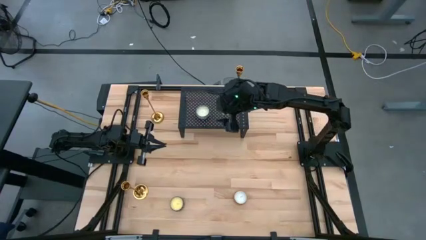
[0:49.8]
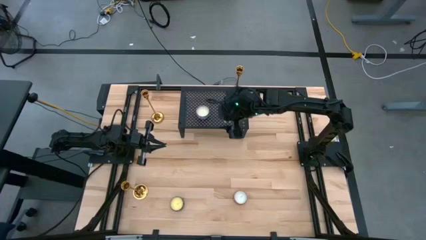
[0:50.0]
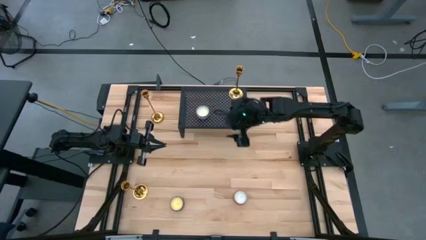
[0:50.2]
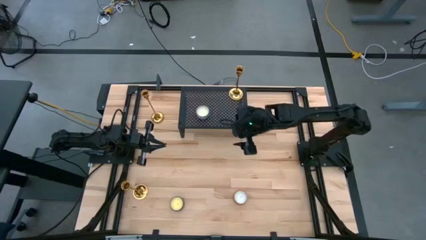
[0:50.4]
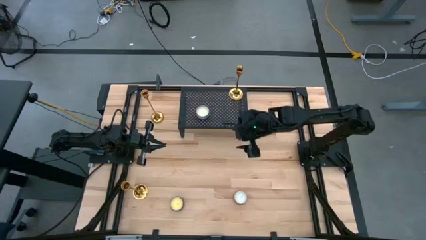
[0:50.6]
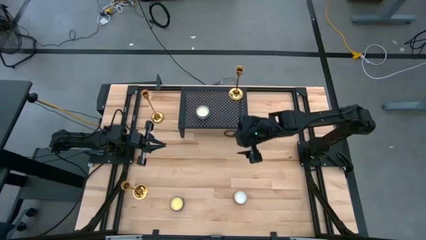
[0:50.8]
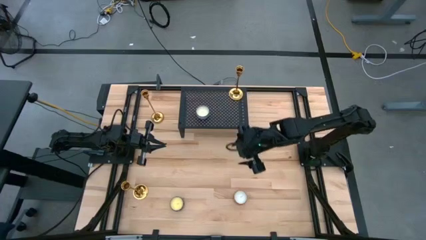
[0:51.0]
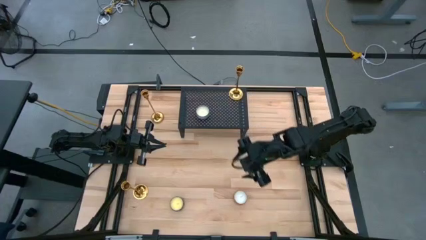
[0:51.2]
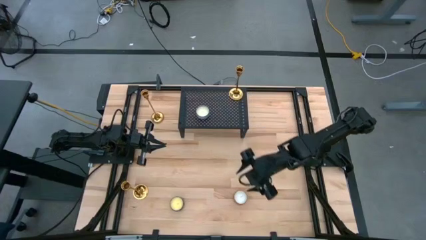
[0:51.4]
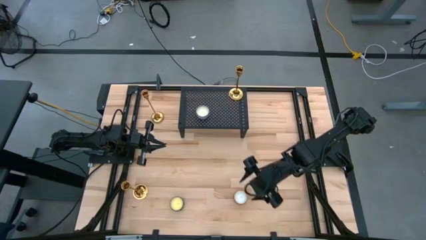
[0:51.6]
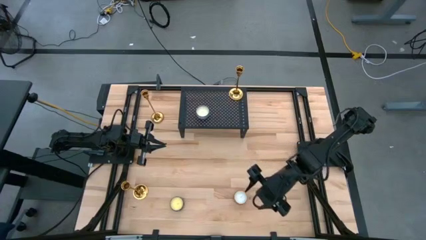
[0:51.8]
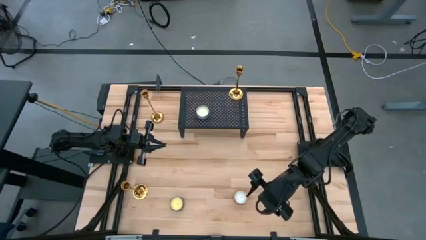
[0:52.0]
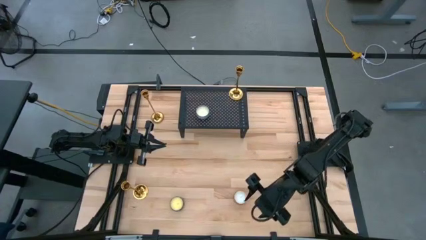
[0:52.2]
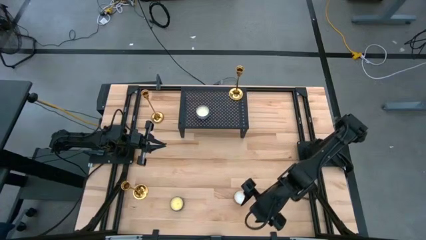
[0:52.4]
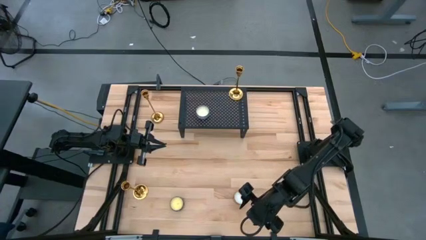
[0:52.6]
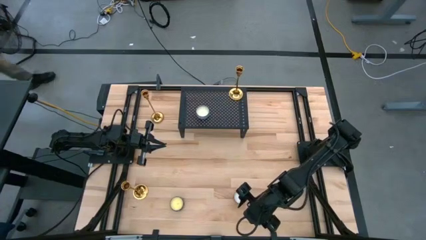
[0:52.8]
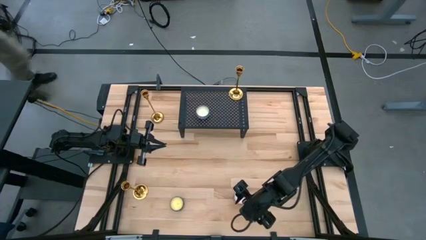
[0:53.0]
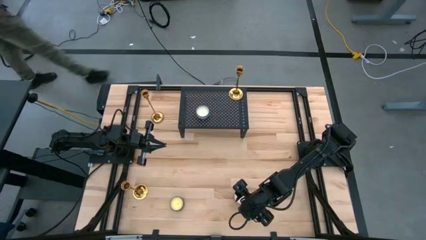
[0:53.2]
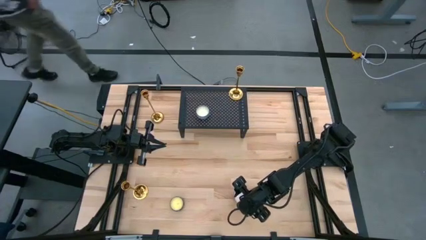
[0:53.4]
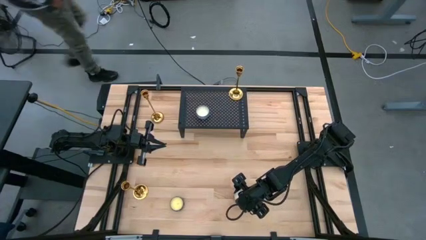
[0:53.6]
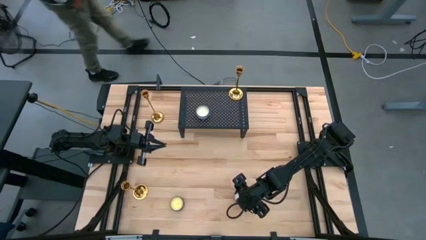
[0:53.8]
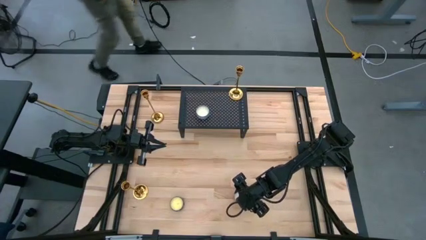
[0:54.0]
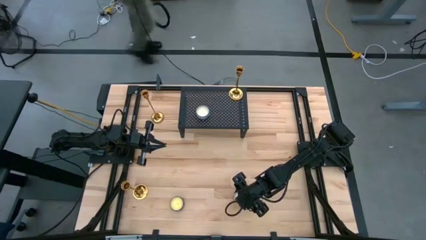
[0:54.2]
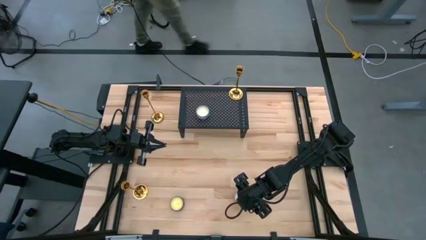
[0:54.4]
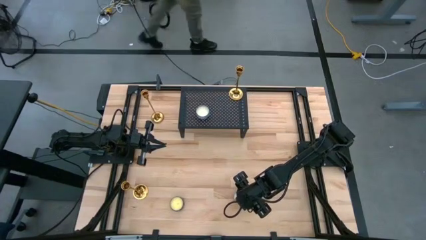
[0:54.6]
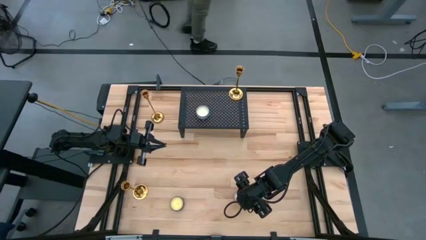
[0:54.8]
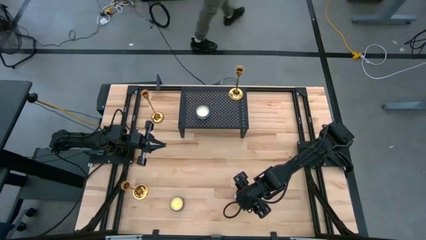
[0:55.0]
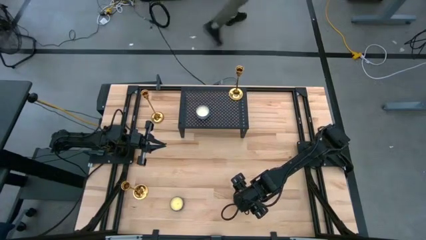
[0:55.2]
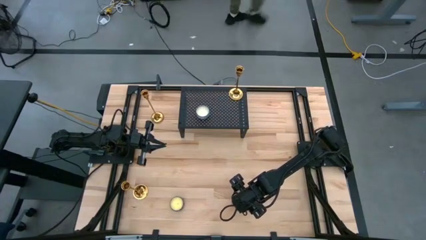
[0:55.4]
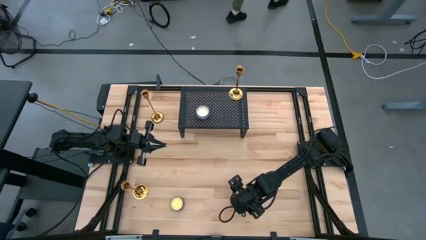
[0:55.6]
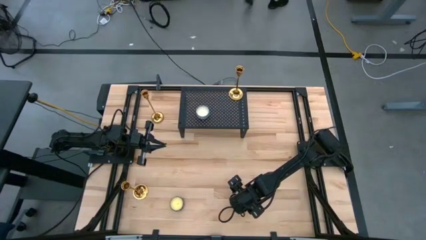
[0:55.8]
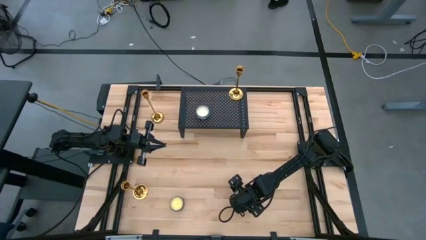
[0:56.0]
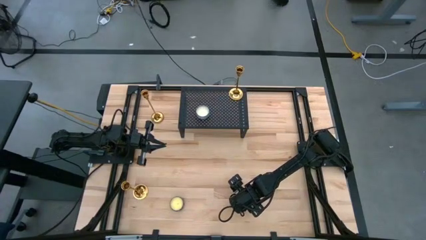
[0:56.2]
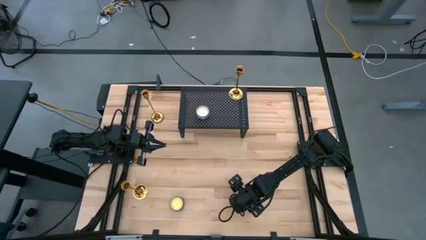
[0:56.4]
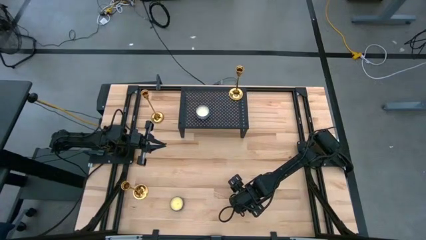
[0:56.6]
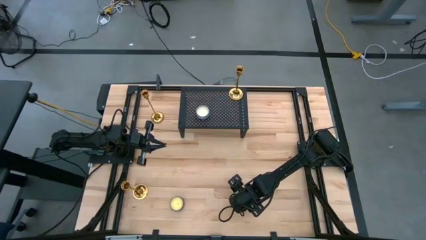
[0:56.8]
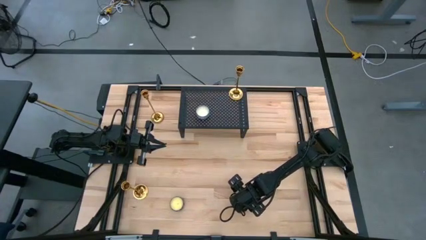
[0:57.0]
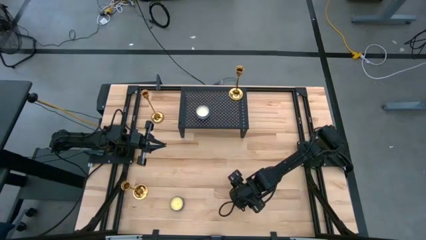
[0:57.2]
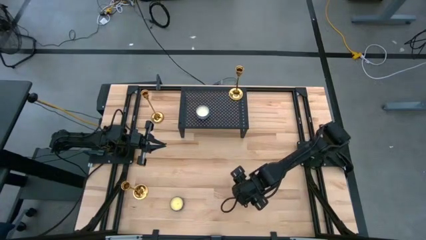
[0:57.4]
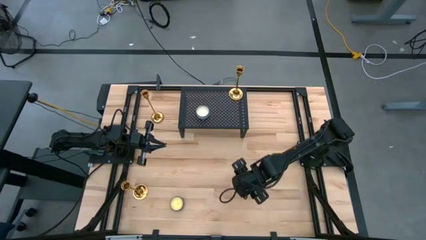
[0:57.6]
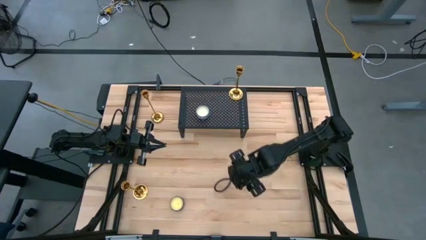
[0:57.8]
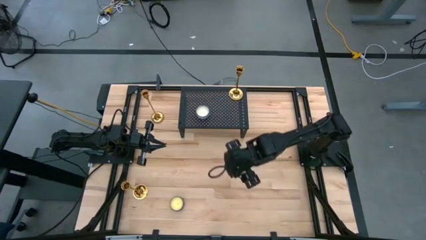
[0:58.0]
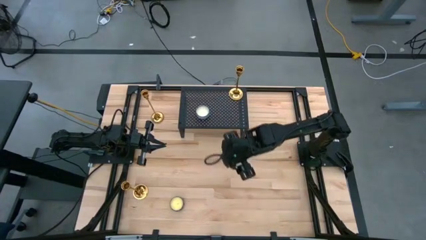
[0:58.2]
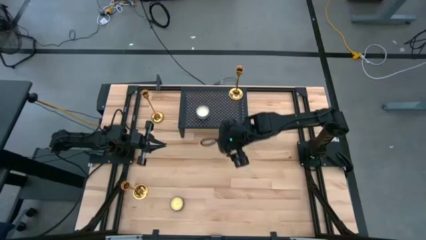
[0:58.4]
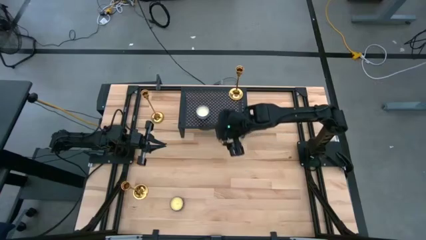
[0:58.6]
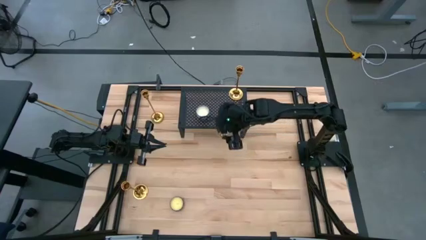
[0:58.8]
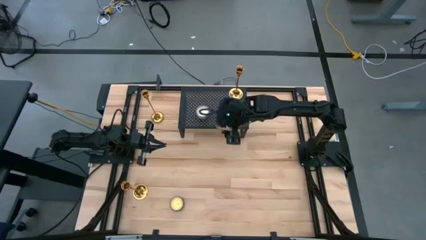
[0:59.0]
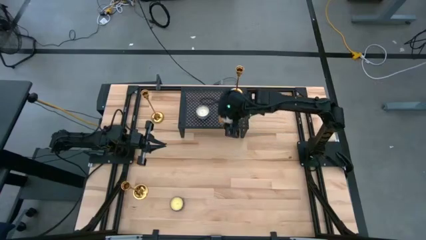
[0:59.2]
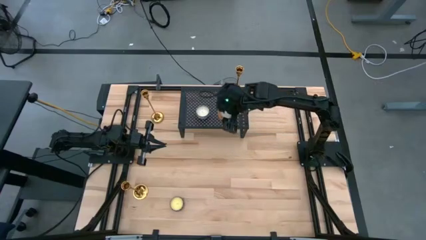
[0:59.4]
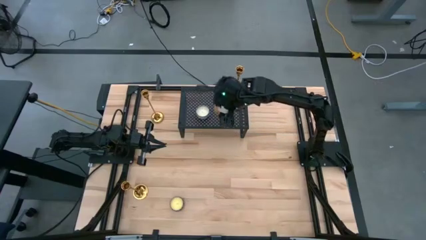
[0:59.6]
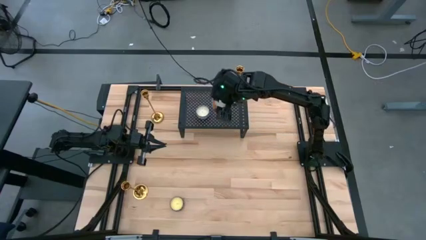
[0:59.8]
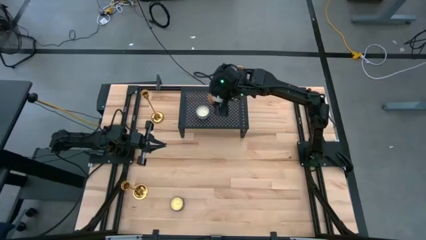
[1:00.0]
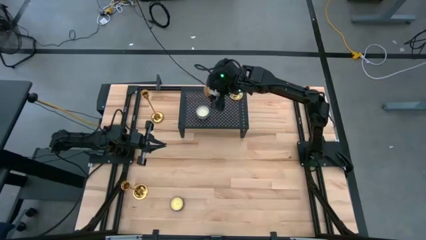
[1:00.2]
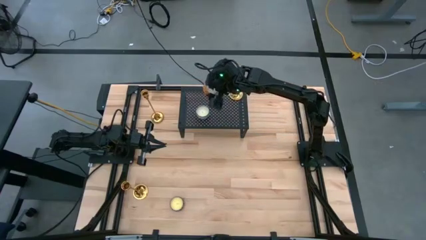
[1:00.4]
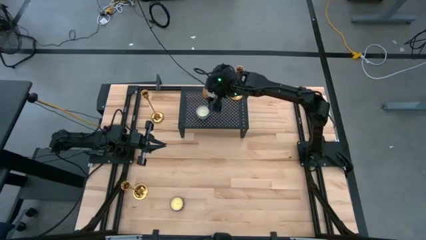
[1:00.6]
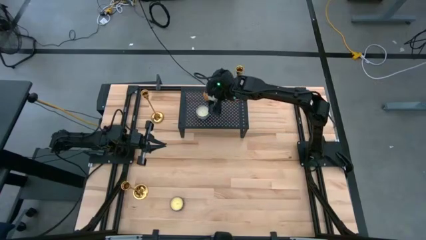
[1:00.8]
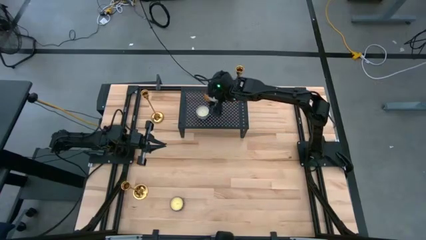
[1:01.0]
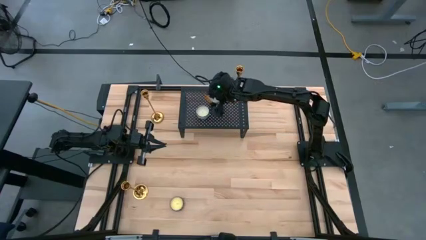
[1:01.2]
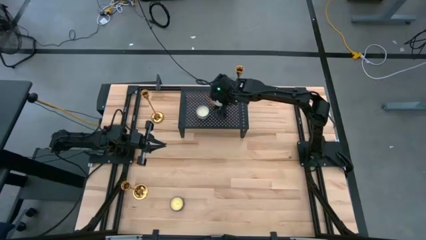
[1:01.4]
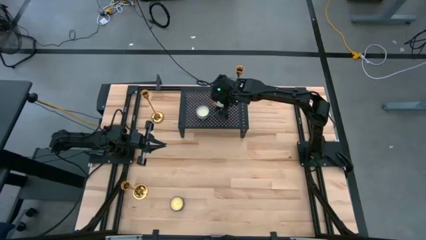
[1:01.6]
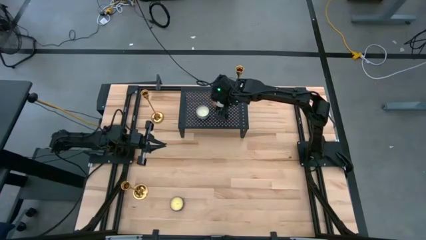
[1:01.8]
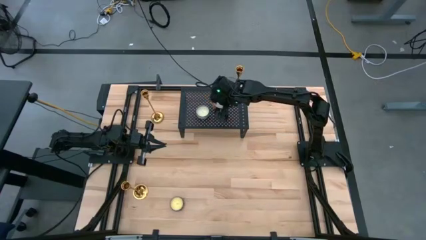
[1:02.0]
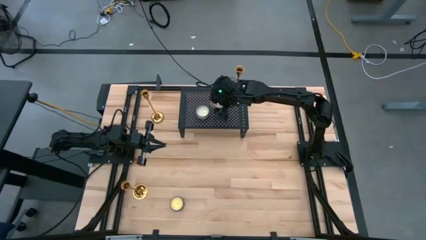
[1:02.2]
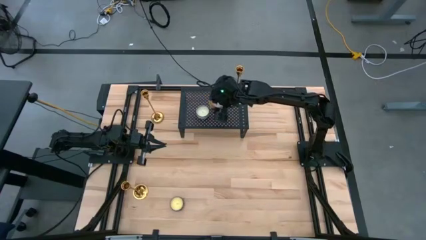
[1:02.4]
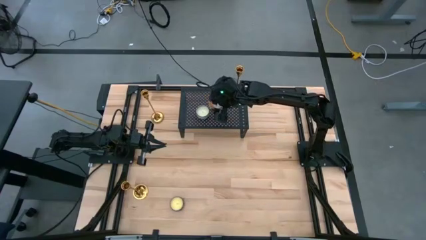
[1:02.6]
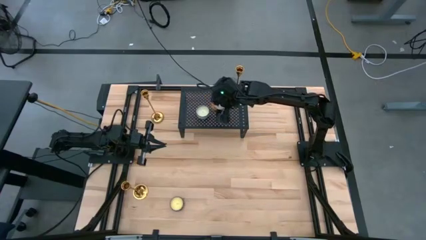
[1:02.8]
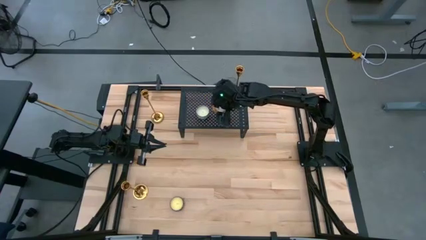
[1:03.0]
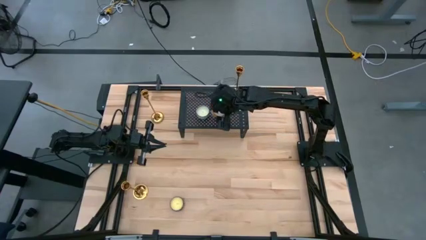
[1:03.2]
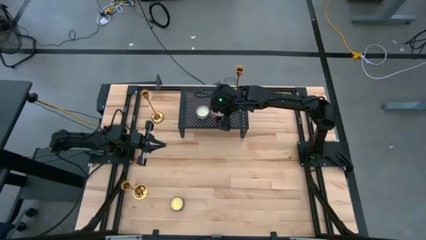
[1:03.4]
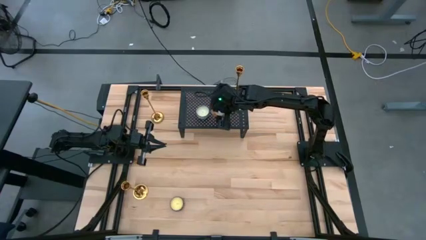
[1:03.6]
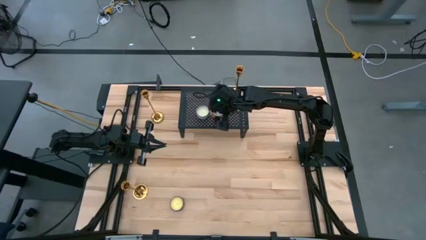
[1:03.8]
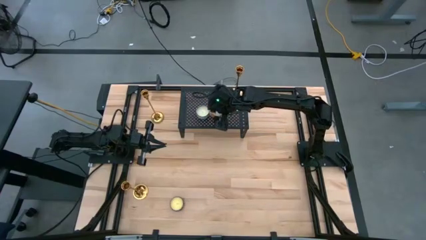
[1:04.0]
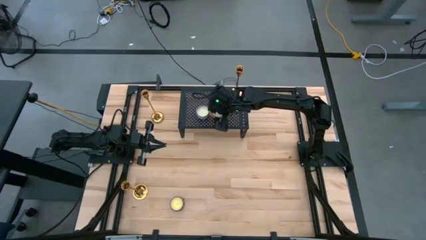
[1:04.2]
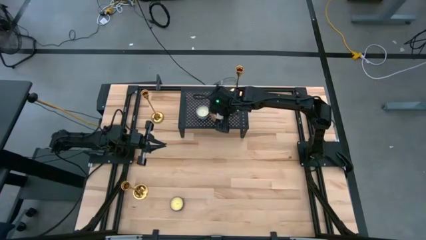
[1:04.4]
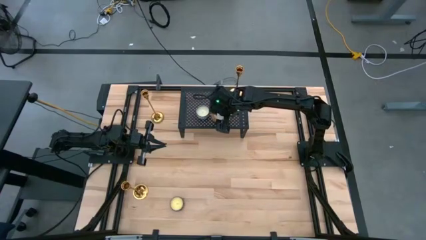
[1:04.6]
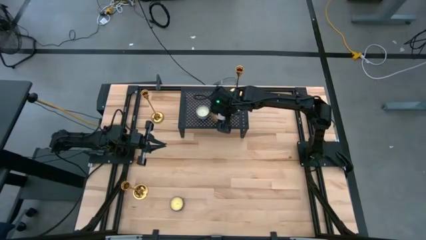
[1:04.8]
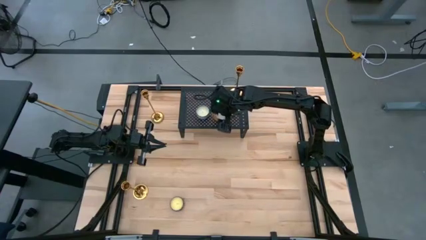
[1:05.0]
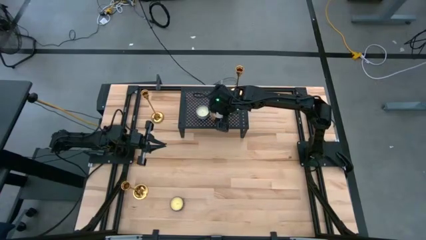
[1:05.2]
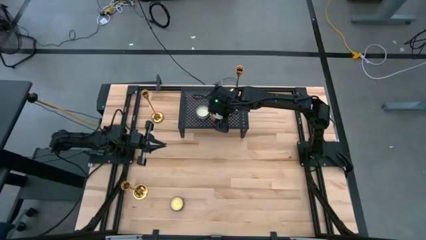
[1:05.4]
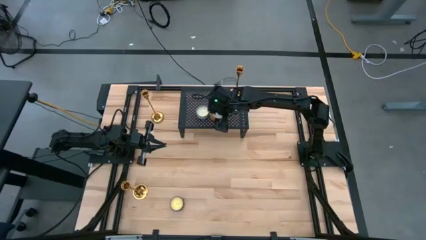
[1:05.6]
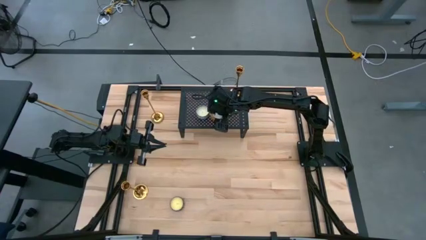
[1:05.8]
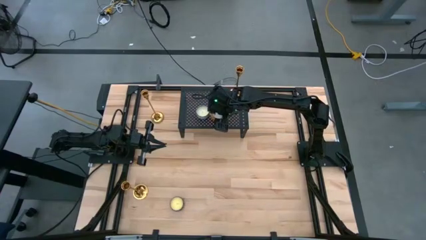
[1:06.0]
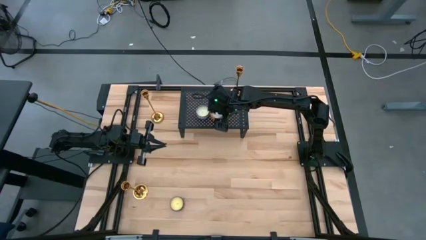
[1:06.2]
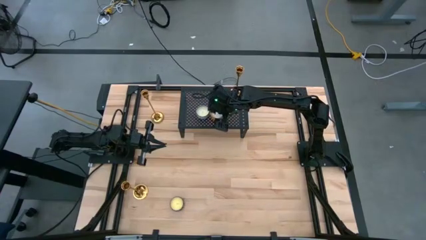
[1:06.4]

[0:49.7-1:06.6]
Task: Pick & Place candle stick holders
Put the orange scented candle on the shelf
